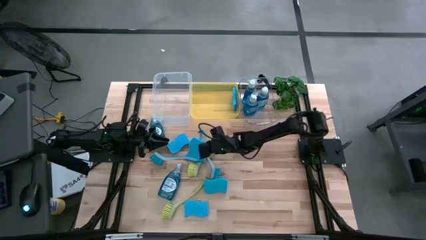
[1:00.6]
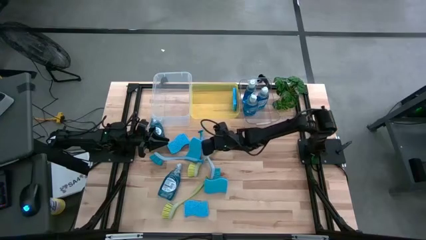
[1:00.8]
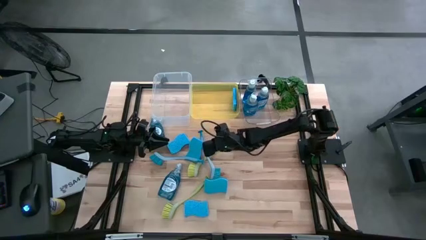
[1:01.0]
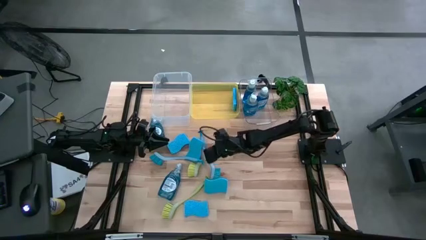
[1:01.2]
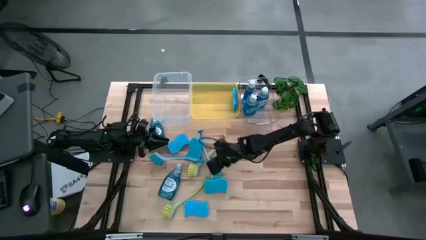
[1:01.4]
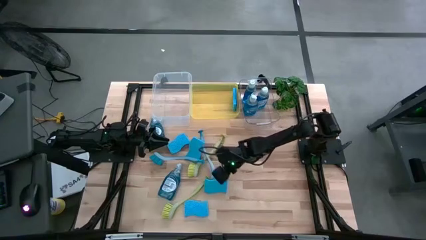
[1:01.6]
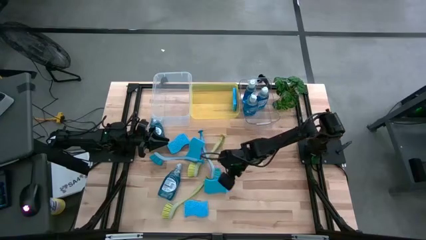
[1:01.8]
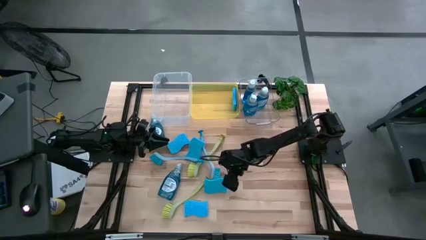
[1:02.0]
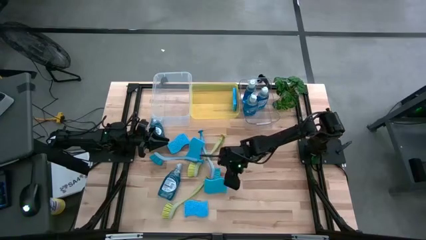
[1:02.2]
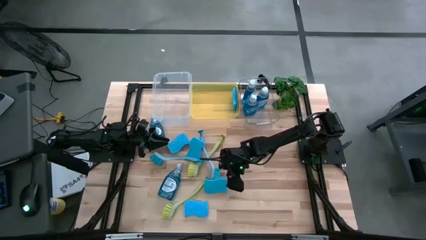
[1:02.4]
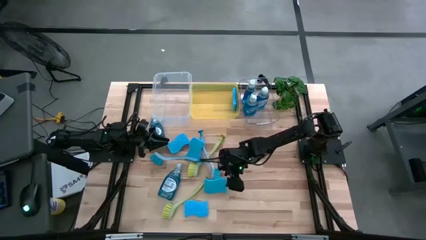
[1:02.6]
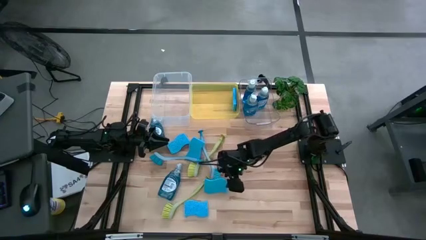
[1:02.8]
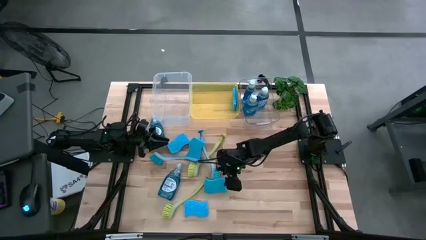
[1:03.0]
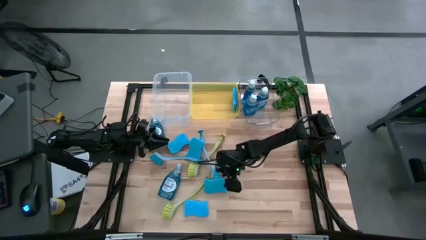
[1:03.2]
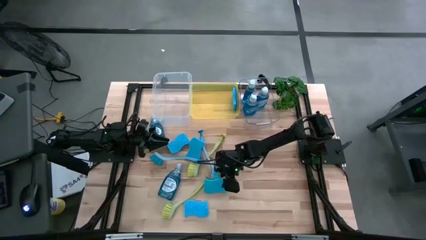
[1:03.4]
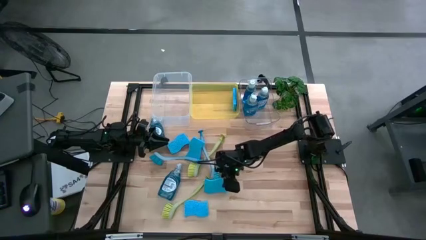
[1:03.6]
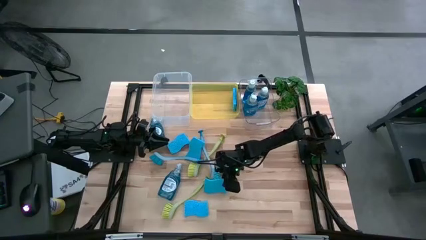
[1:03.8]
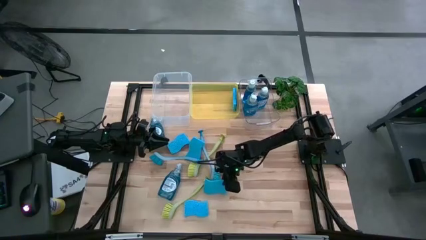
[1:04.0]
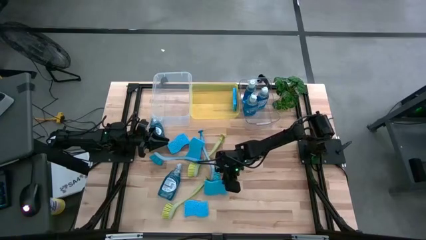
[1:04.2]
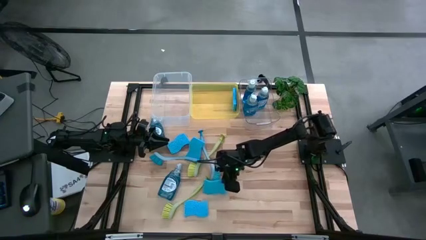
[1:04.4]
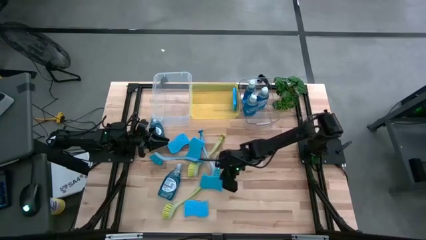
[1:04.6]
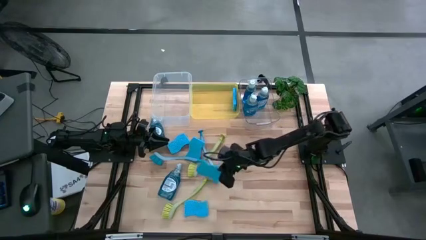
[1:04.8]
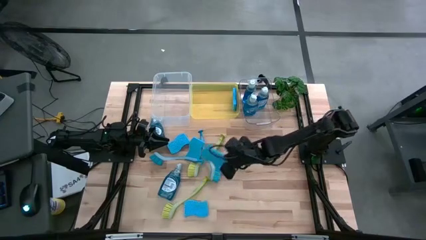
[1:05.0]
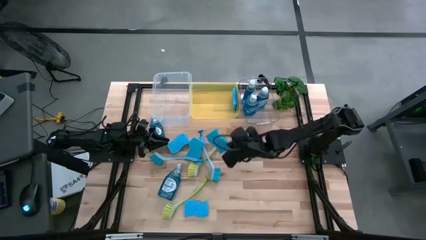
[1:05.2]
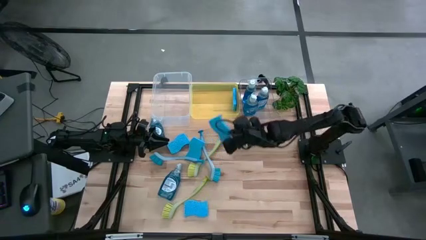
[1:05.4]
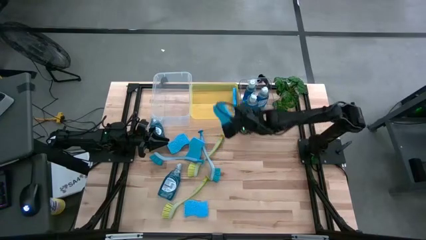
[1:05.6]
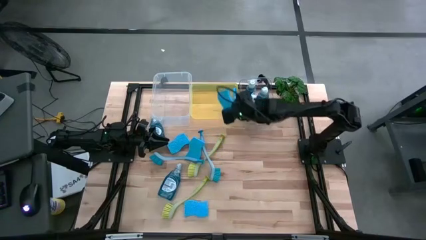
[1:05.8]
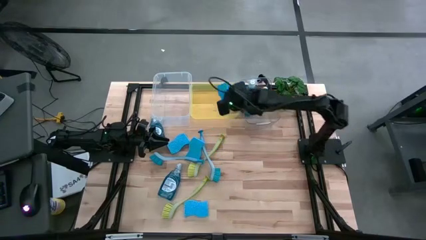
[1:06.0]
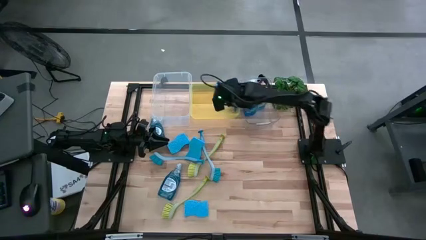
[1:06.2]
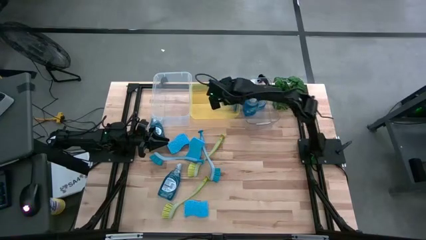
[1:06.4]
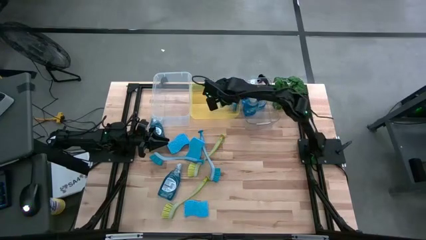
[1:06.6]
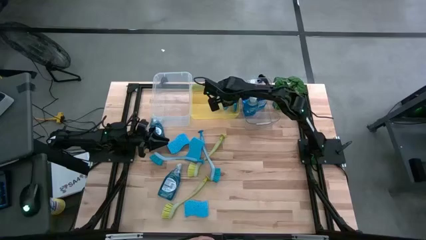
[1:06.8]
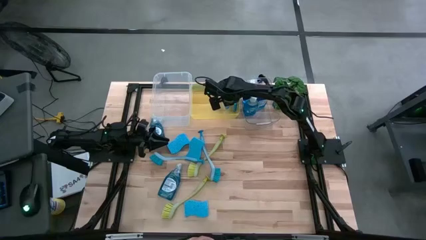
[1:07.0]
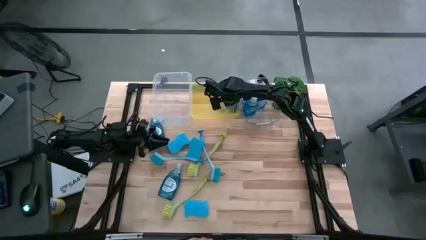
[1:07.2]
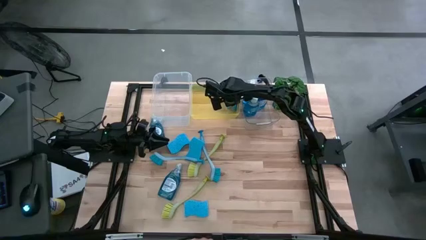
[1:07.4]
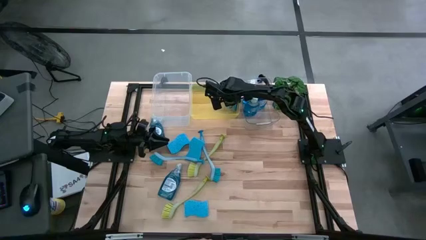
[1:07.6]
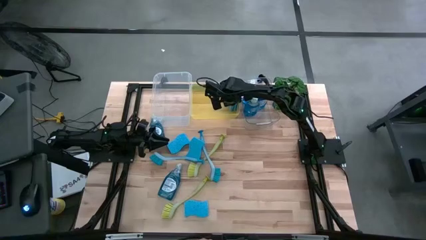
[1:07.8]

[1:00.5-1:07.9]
Task: Pick & Place Kitchen Sink Supplies
Put the blue sponge into the yellow bin

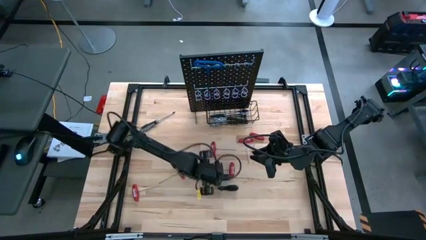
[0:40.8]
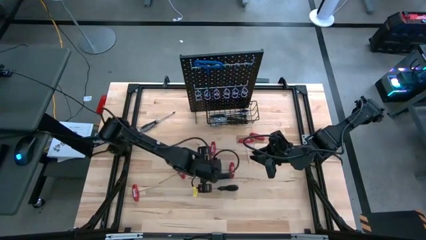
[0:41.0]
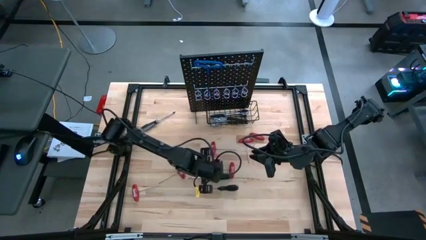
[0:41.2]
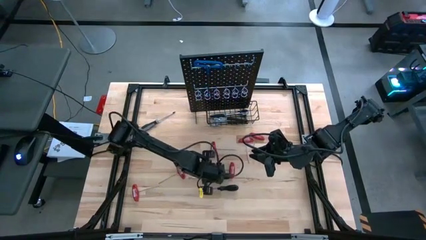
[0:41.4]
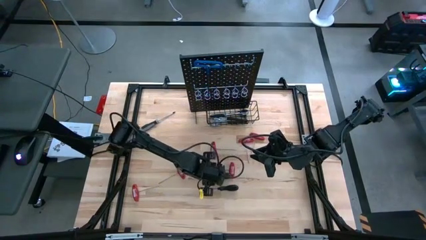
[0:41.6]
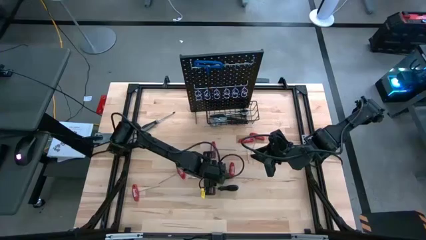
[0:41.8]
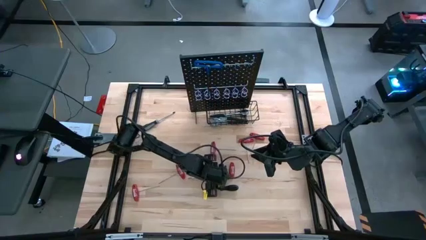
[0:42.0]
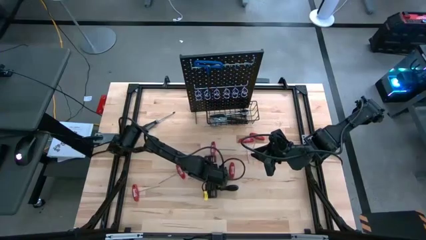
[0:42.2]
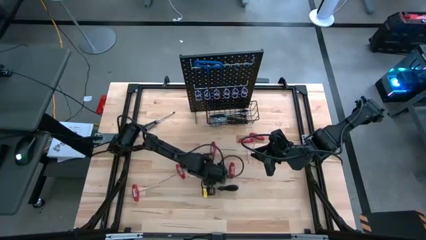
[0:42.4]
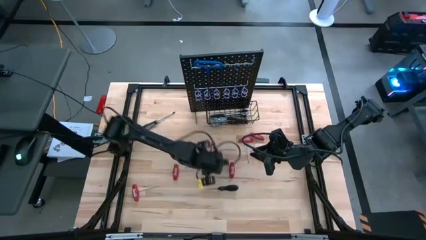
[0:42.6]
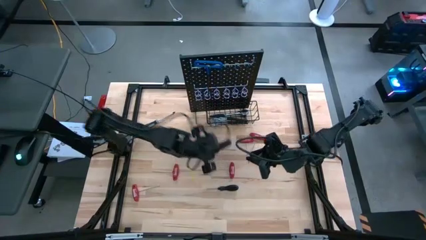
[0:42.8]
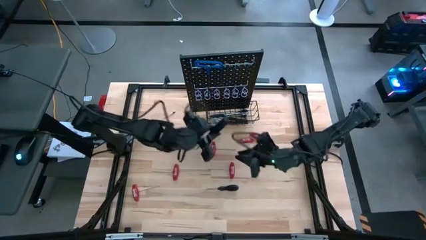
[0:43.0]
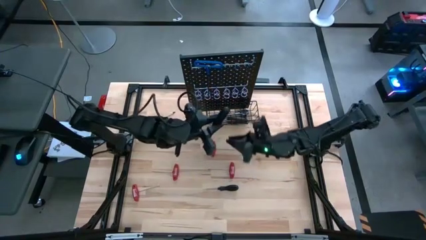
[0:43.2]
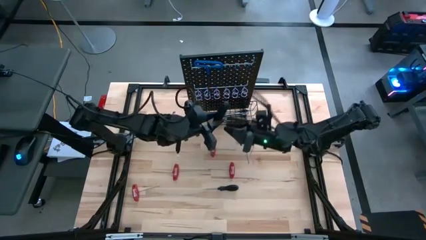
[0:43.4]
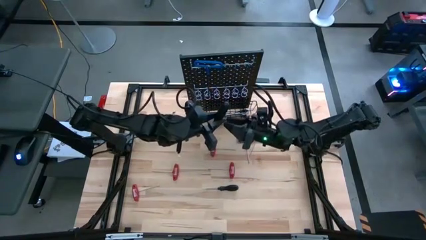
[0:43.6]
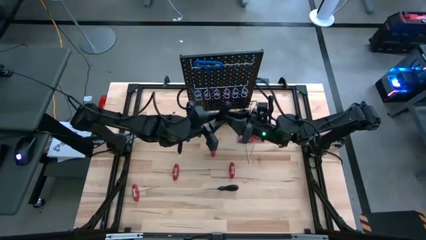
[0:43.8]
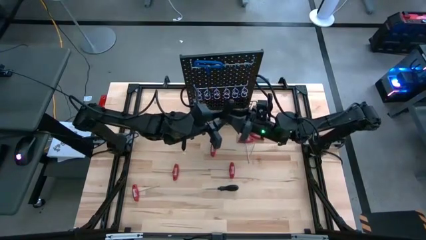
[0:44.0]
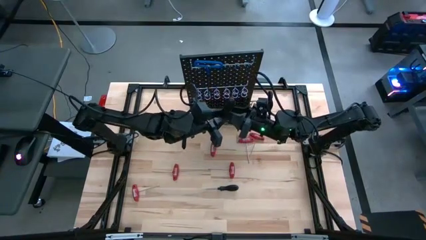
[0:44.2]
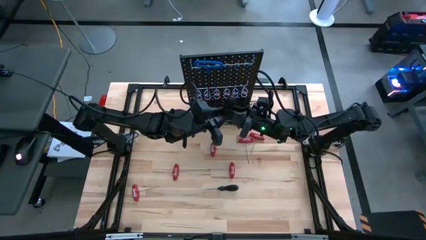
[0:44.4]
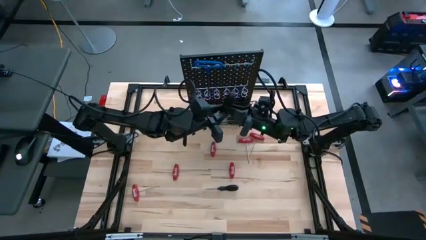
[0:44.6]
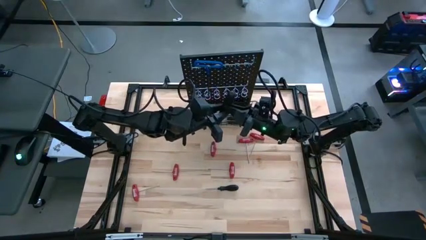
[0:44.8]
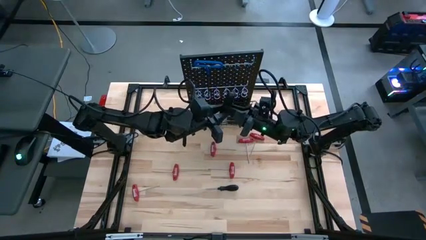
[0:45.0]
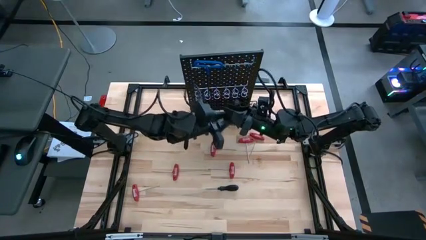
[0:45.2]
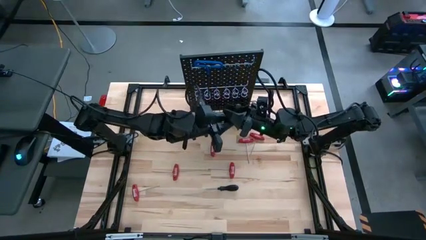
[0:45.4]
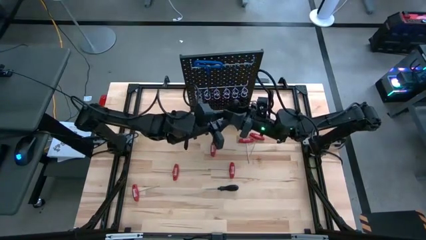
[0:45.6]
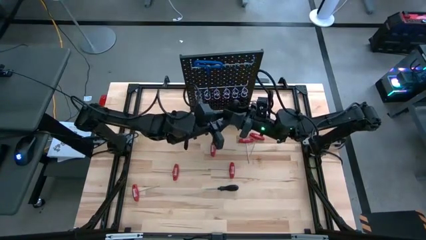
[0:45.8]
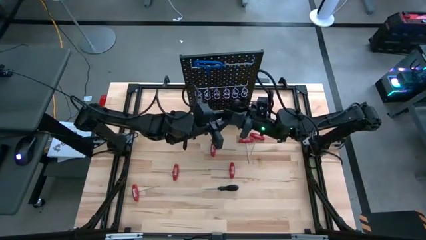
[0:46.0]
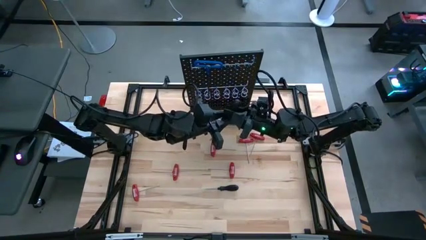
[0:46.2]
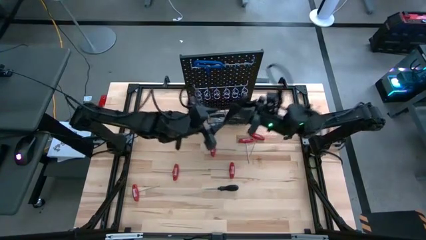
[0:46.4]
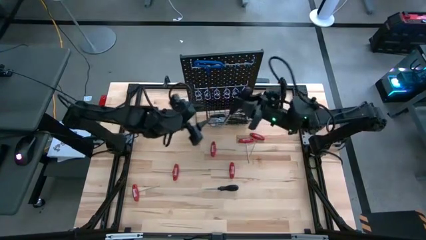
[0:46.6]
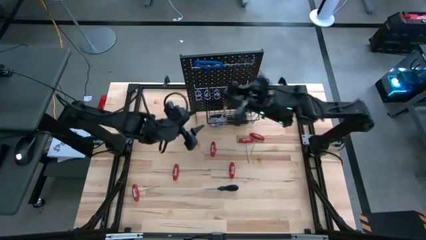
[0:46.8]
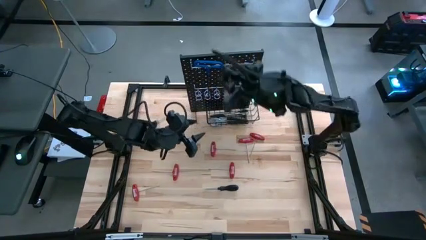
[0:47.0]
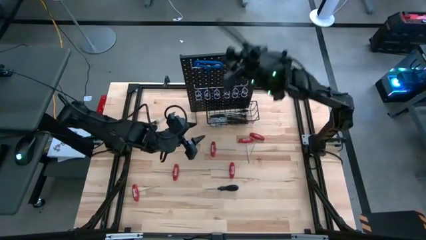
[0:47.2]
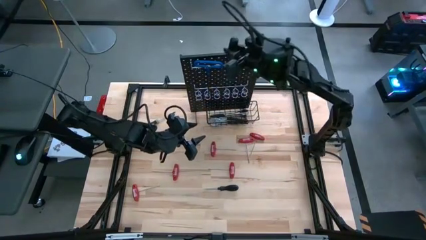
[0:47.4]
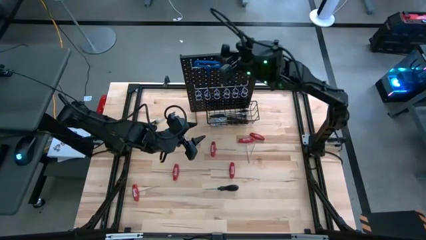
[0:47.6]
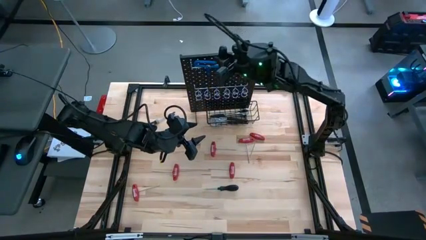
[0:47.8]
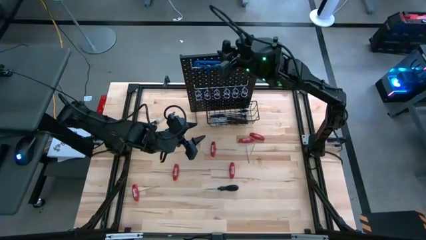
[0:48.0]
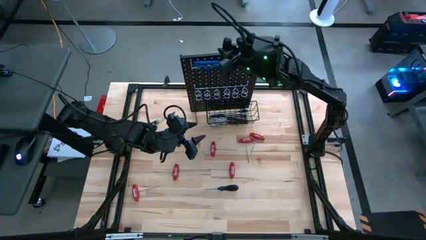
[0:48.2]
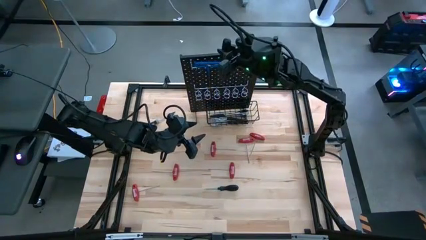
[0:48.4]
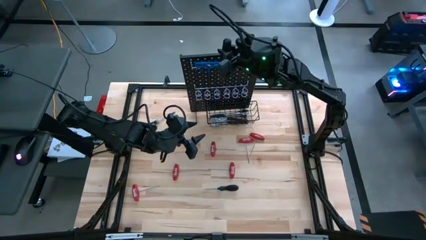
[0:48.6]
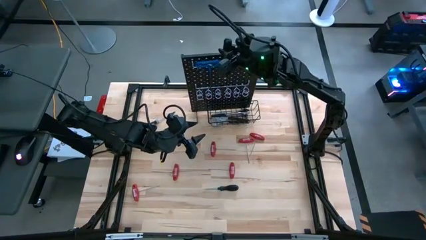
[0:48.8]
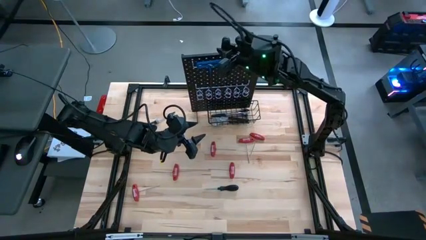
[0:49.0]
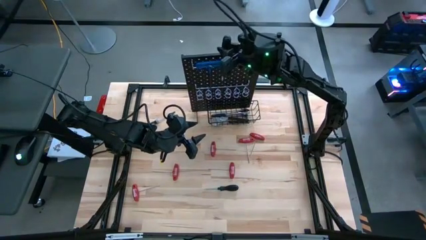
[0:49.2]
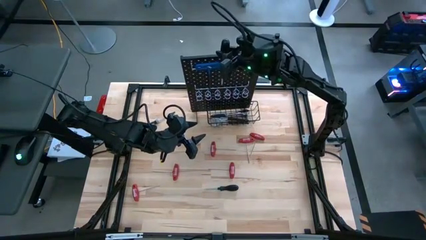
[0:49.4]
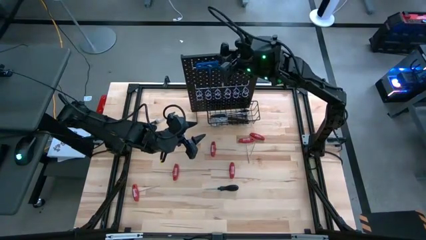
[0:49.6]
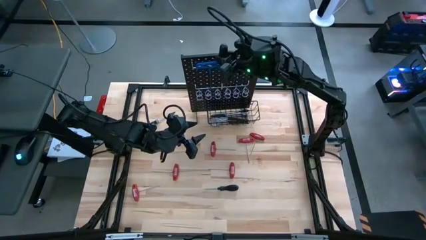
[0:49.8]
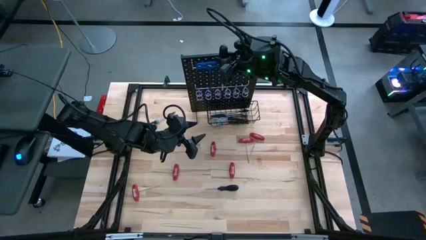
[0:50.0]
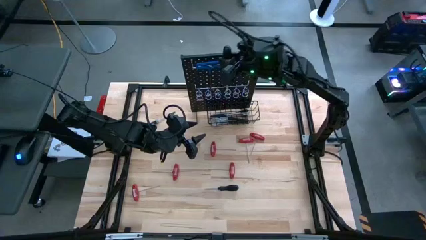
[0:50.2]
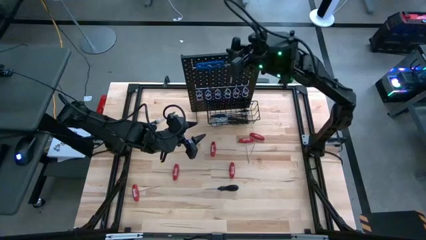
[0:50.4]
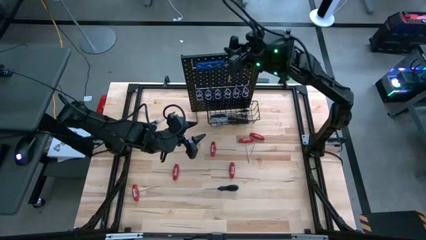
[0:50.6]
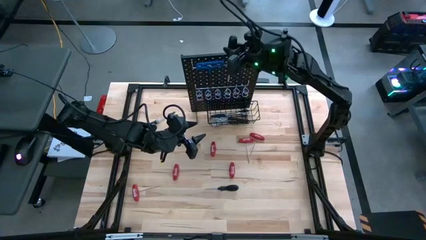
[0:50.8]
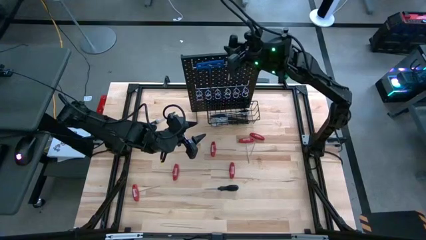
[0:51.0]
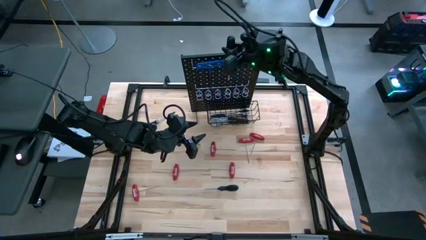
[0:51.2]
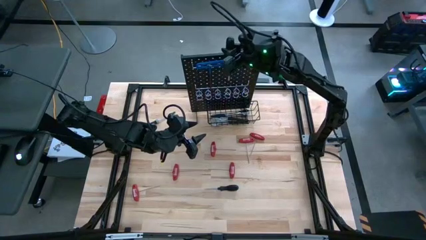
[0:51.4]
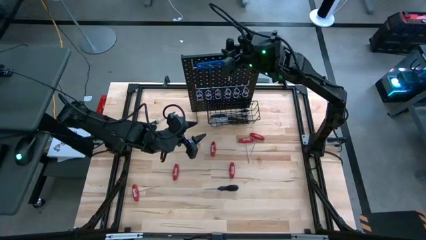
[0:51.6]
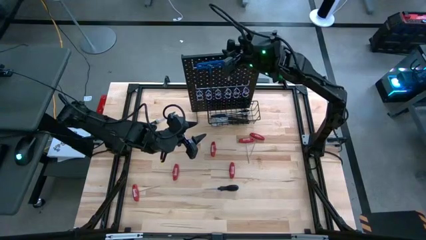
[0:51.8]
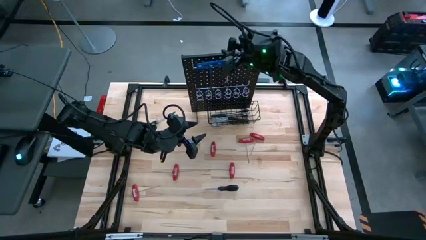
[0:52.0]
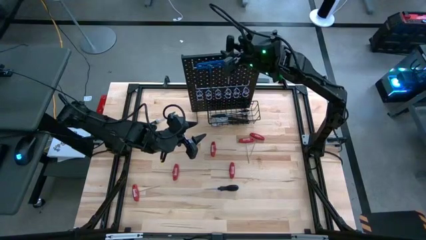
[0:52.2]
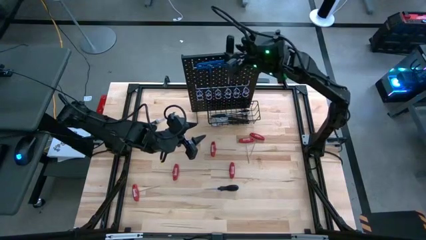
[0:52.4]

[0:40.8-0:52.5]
Task: Hang tools onto peg board
Hang the black screwdriver on the pegboard
